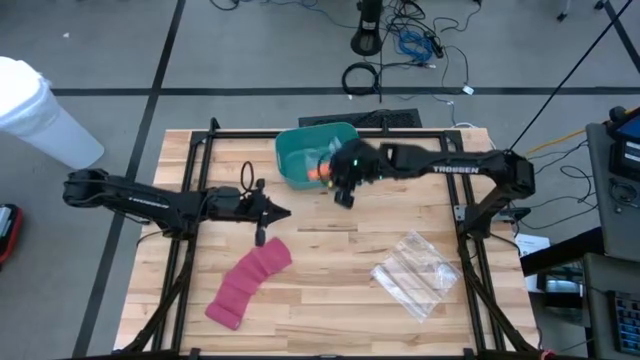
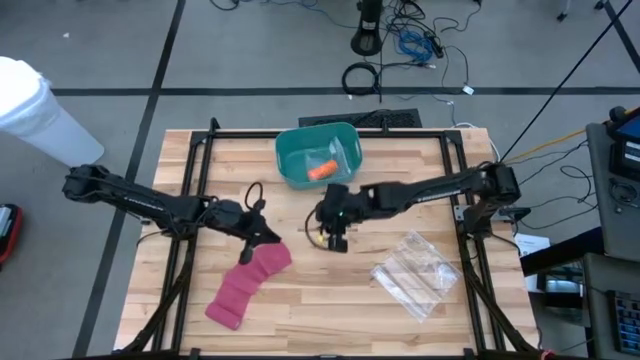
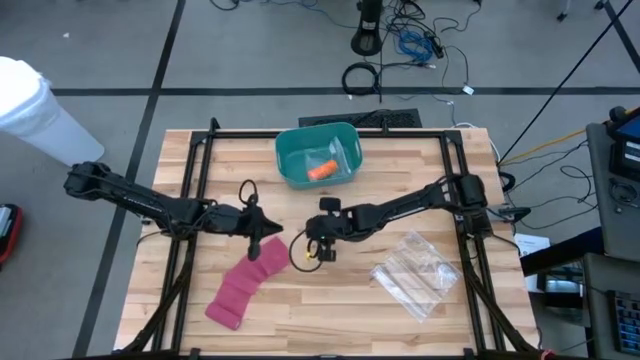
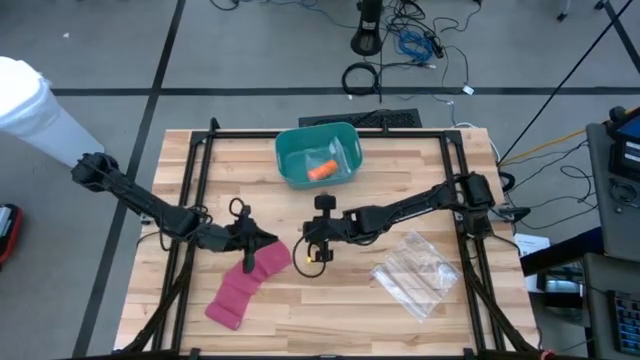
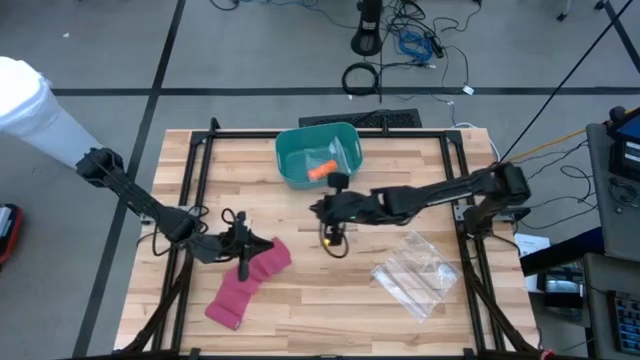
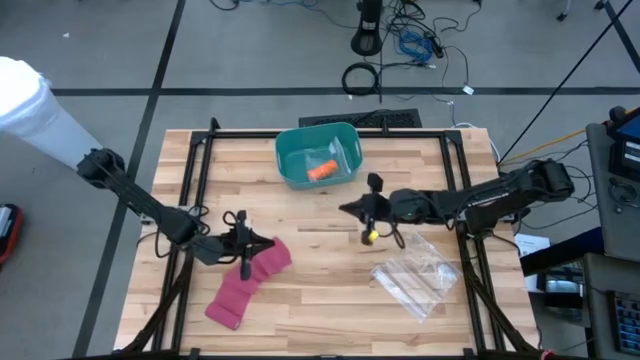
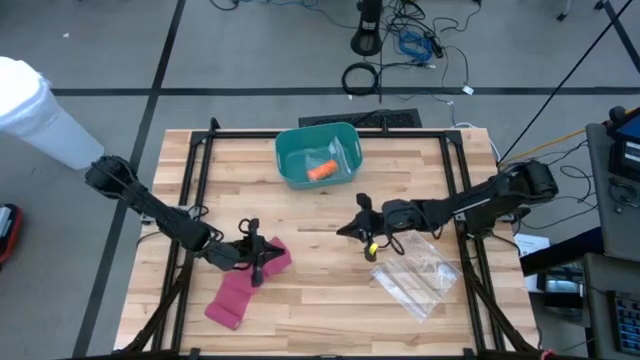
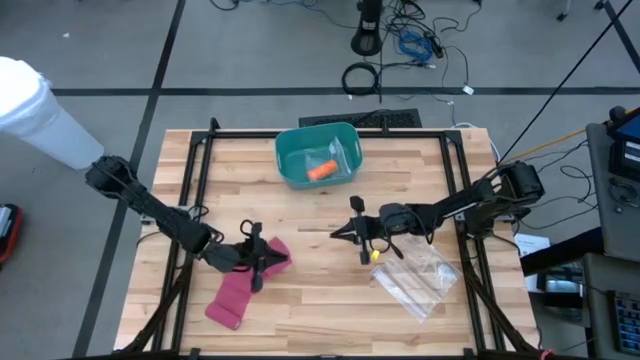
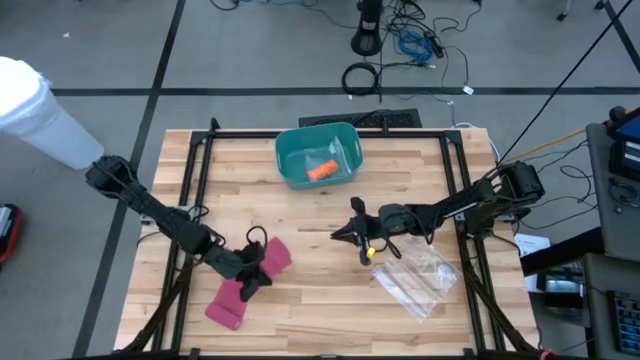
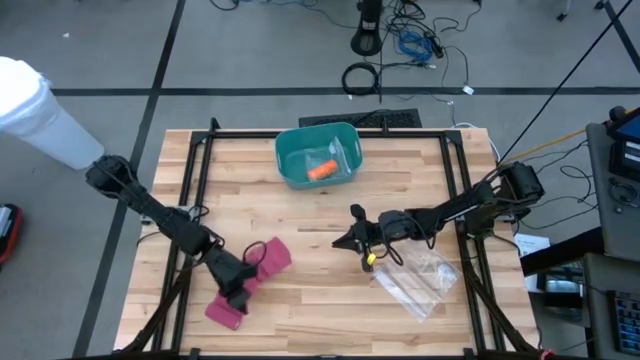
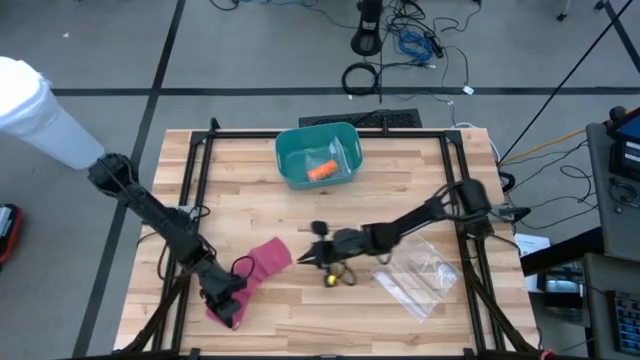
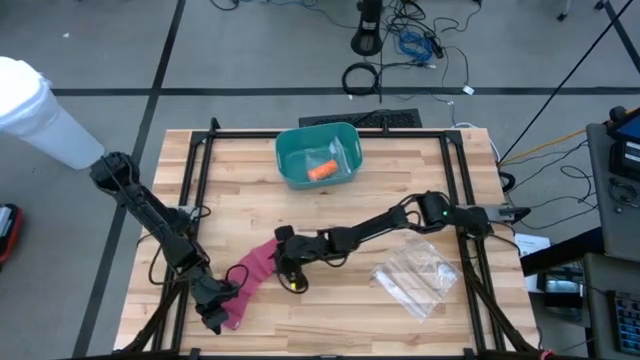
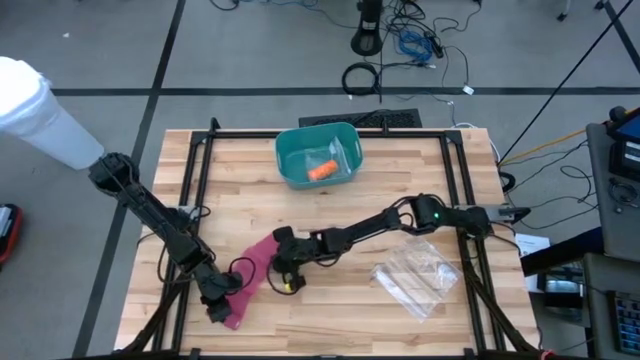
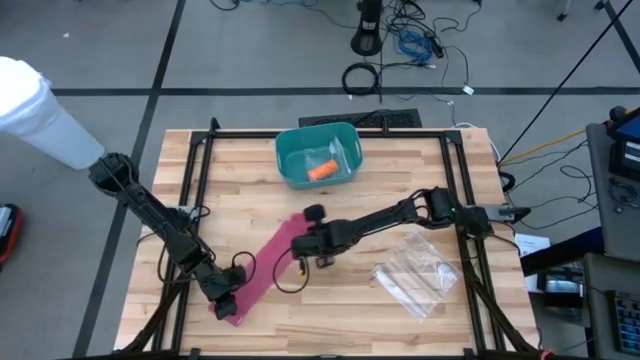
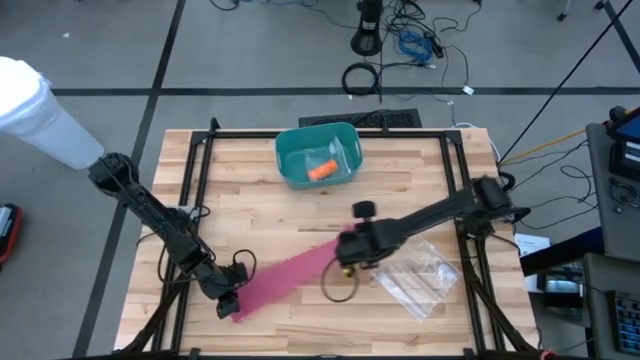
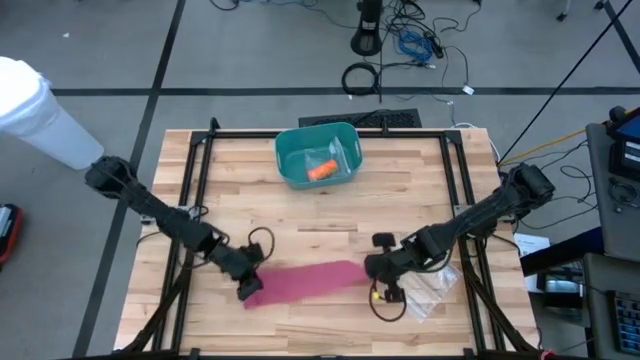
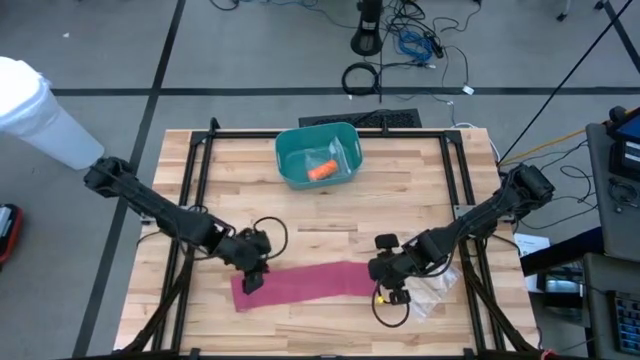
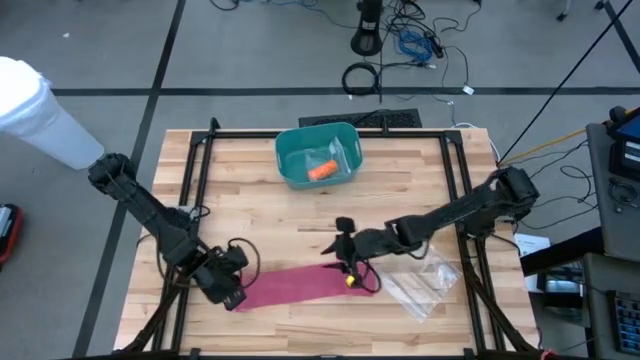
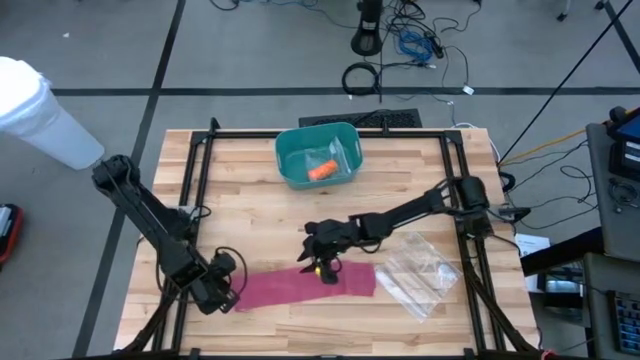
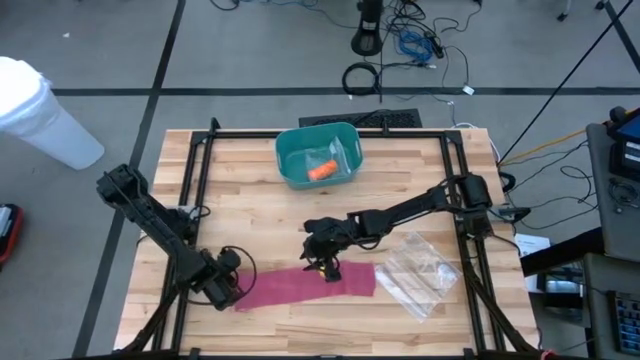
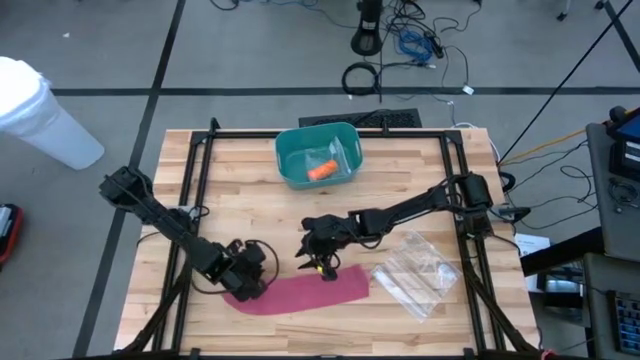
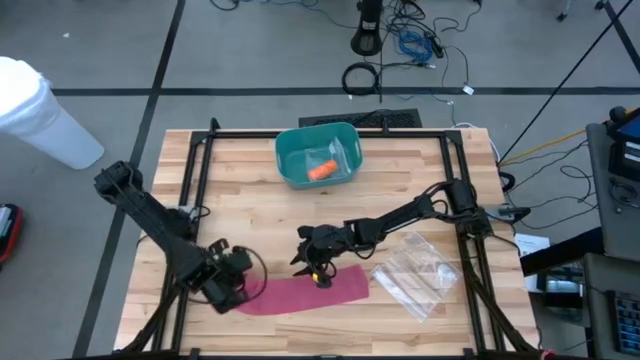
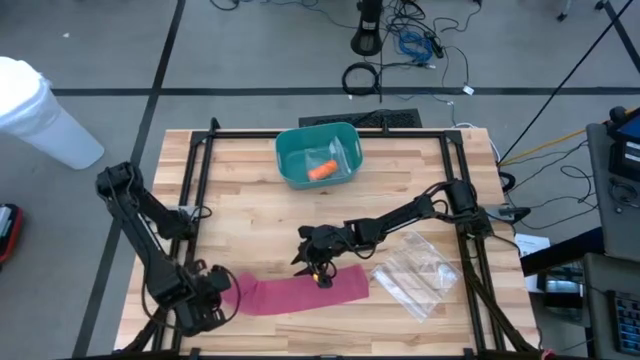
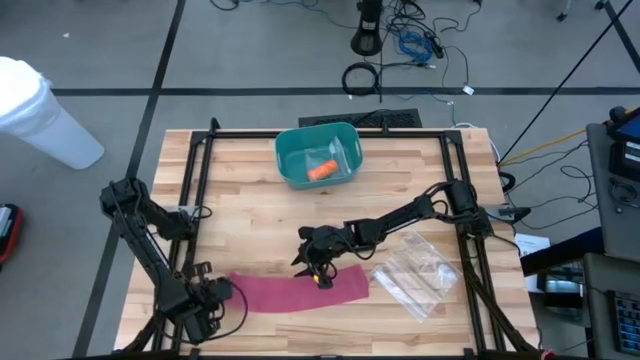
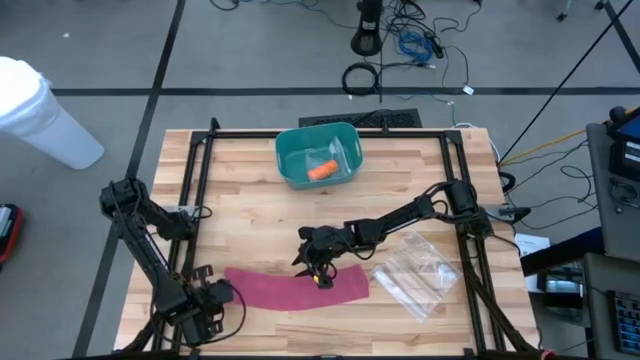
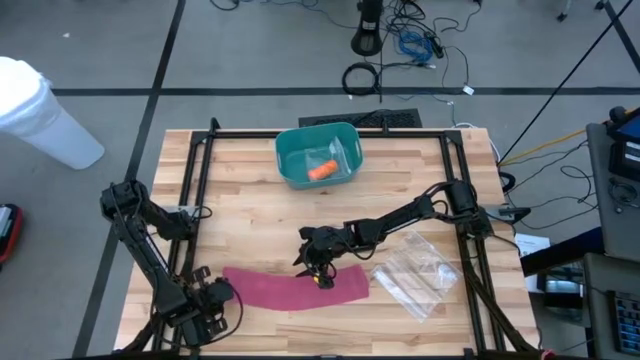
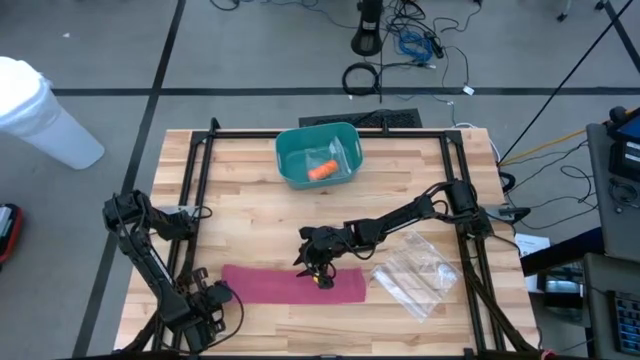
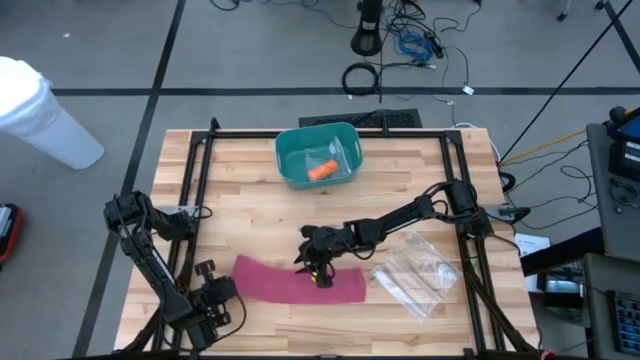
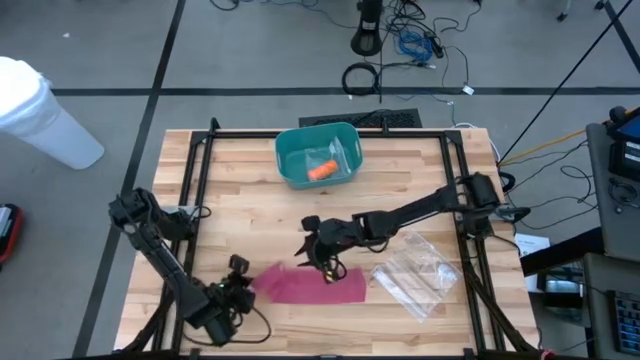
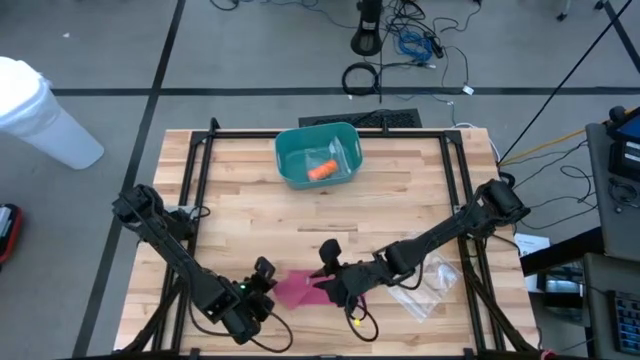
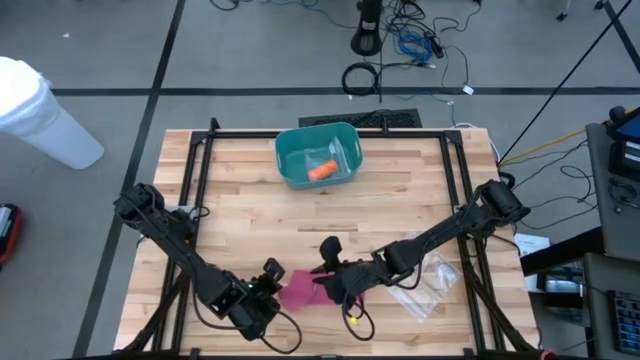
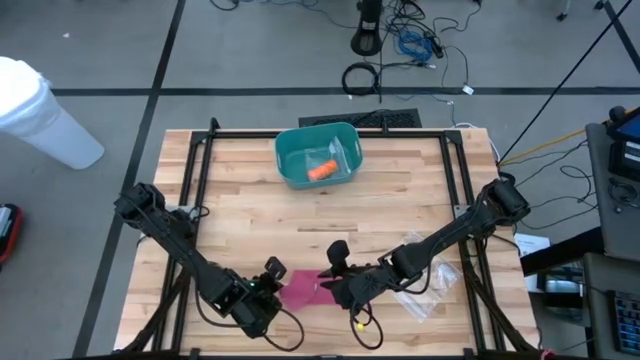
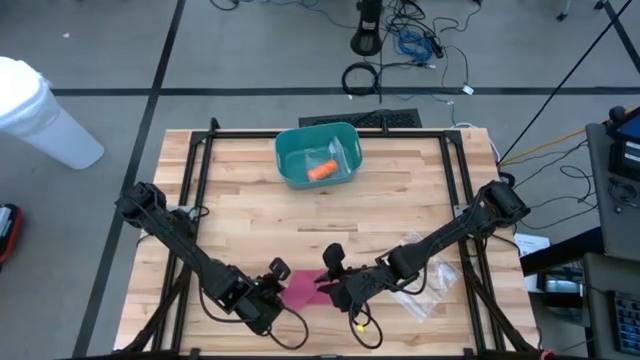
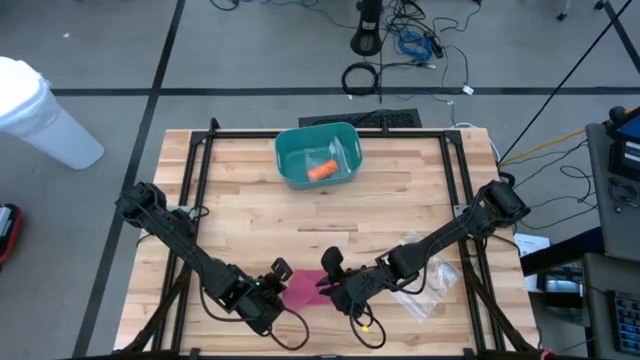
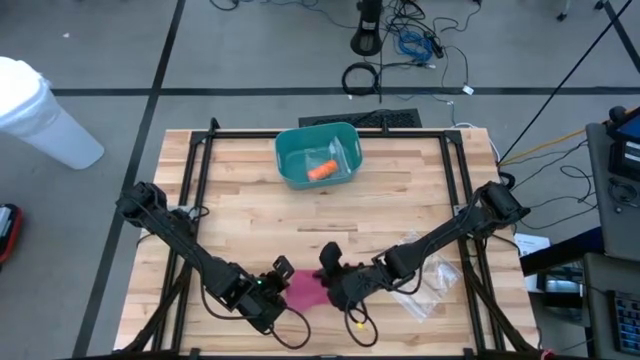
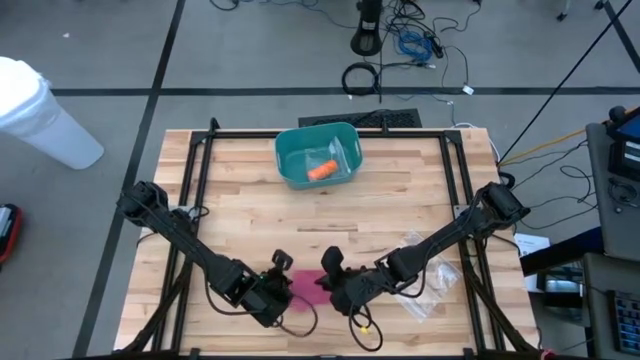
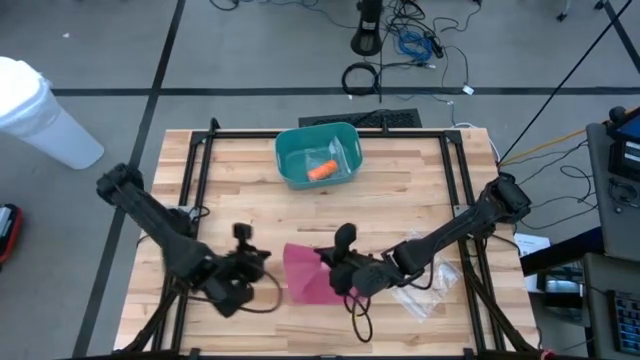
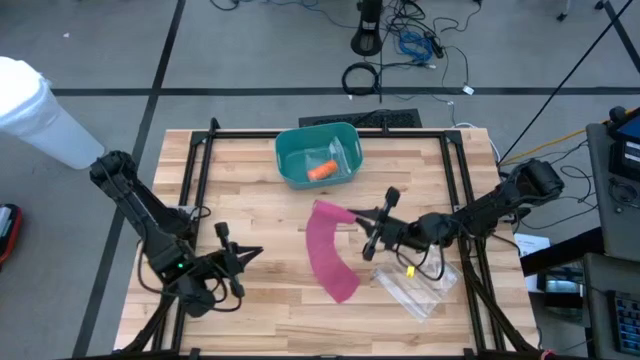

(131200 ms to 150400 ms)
Task: Roll bandage
Roll the pink bandage
